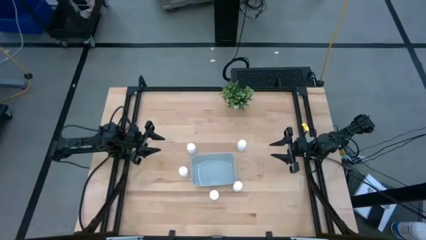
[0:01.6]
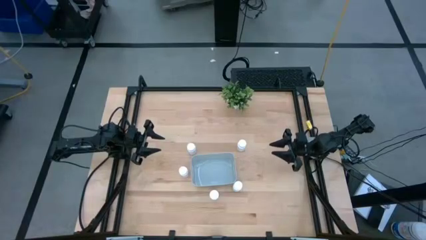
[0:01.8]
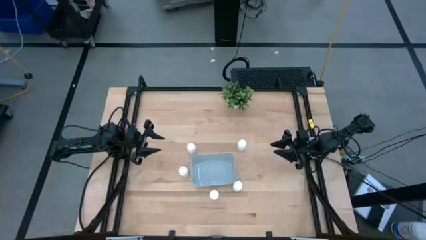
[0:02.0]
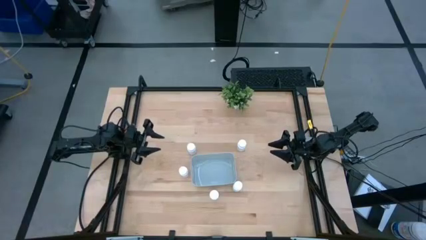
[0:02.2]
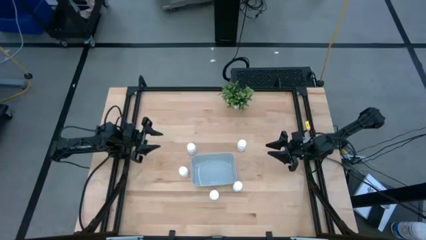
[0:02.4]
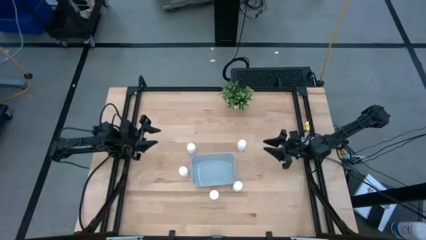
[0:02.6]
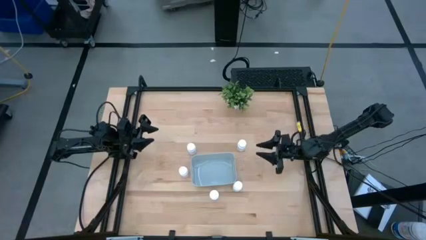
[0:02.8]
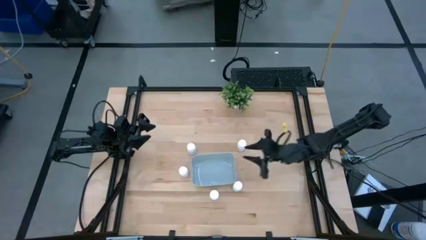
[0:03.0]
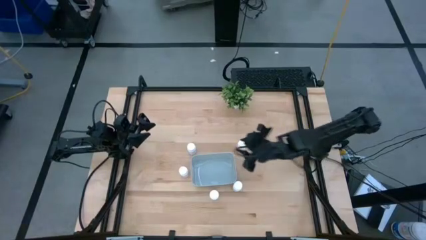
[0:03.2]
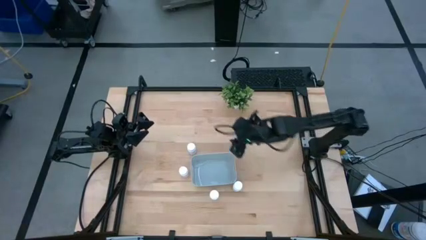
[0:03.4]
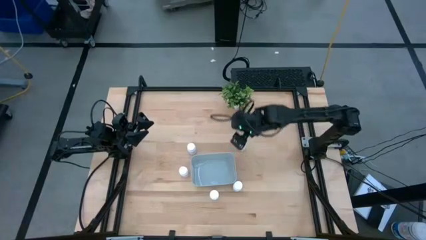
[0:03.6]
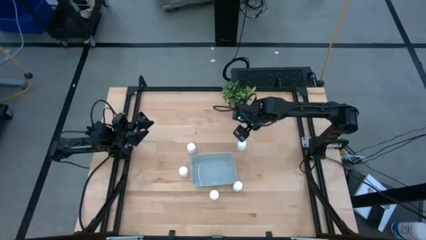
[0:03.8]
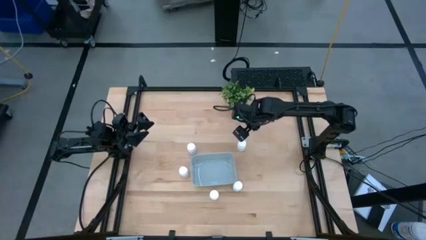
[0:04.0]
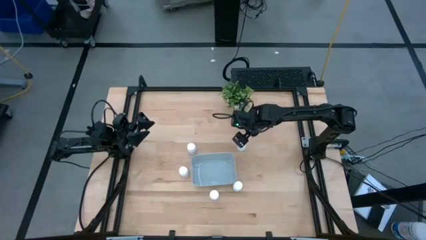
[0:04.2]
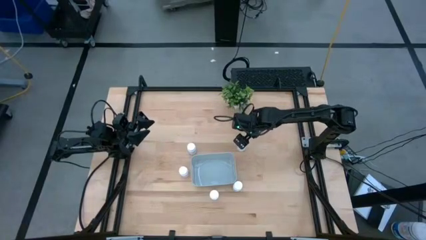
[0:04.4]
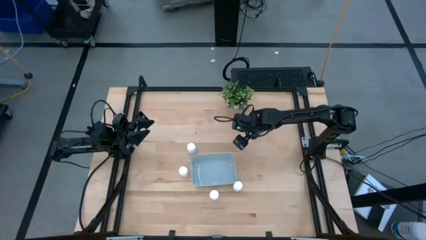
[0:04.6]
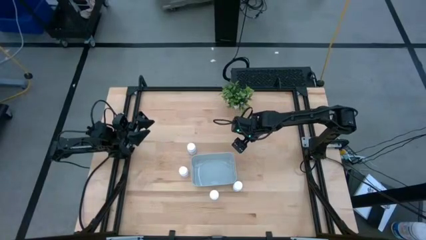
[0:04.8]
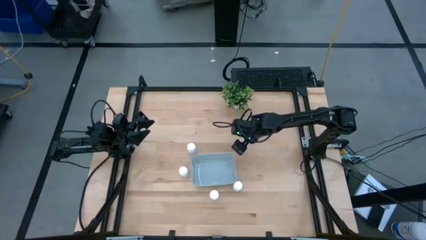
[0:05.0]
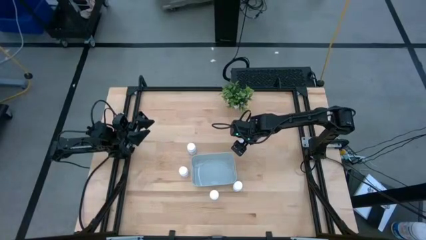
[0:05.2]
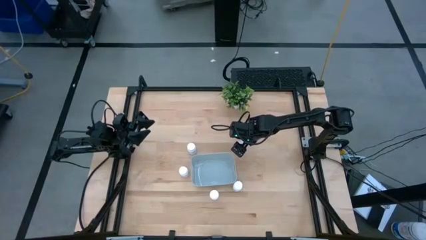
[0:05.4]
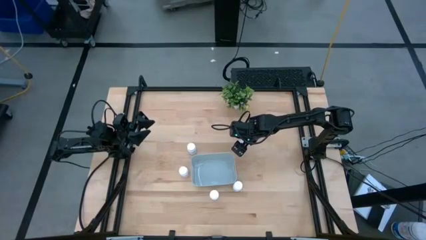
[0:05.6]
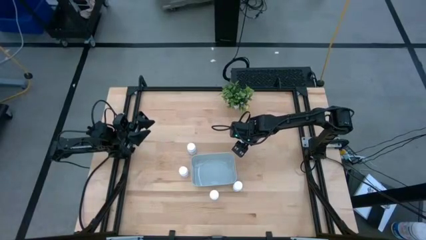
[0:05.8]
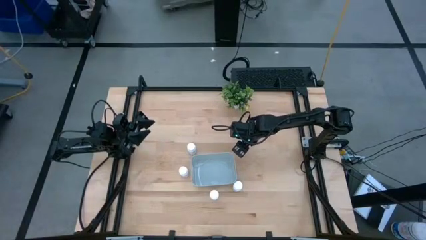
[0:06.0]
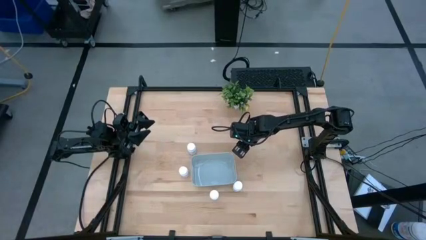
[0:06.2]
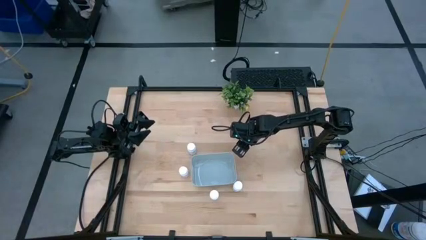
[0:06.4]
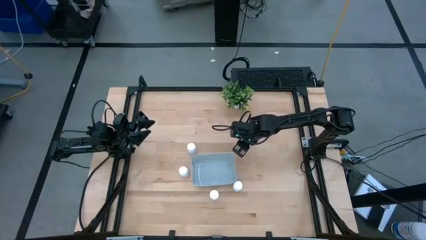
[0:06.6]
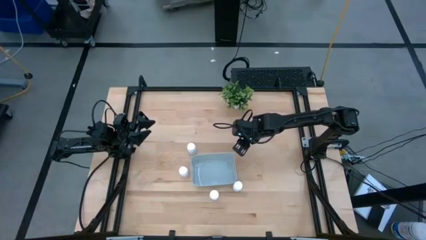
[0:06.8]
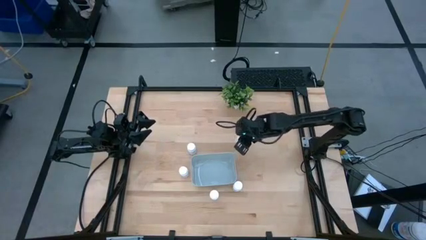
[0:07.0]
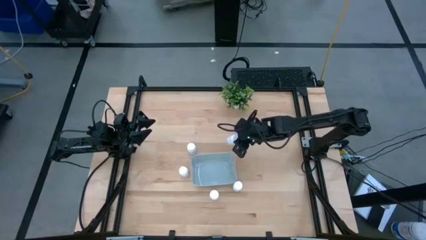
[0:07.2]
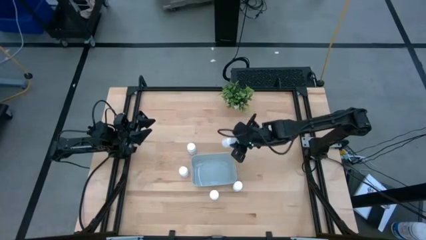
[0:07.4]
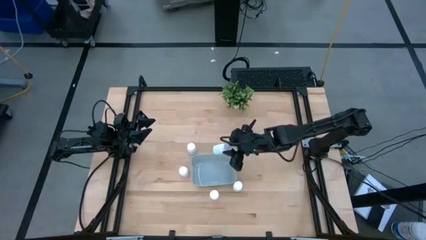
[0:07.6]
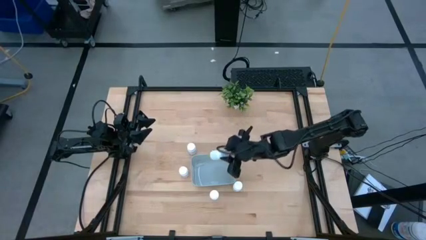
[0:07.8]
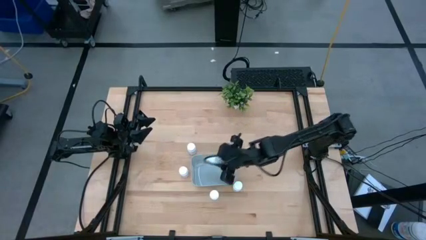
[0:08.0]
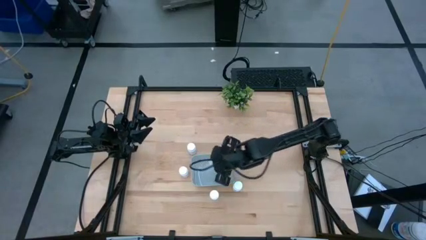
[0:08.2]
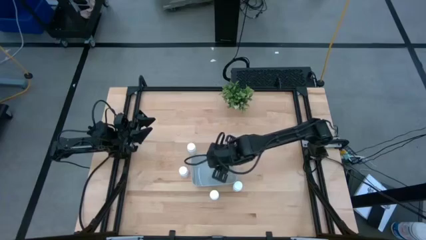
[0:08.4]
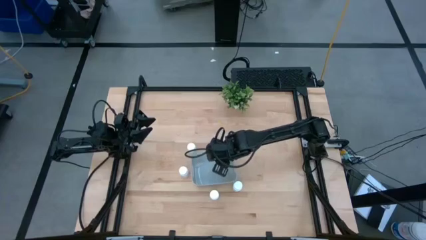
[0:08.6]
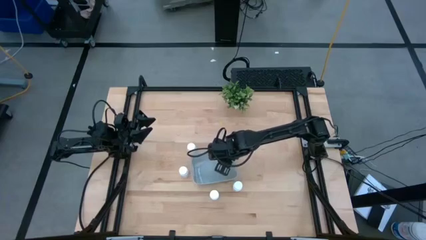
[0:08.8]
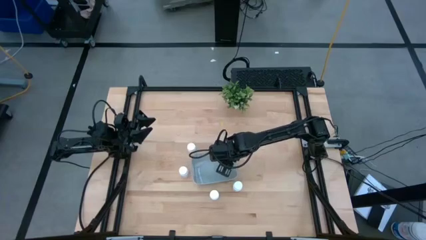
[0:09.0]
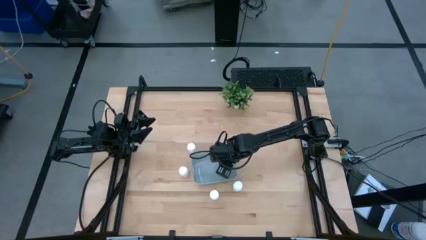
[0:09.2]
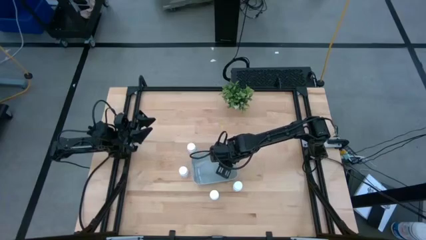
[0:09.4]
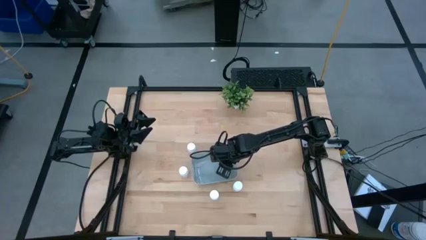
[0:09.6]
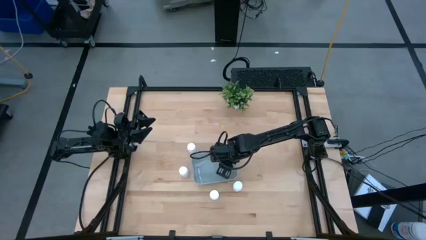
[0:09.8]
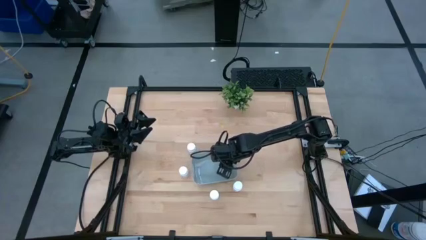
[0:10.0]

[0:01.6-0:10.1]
Task: Pick and place pill bottles into a basket
Put the white pill bottle into the white bin

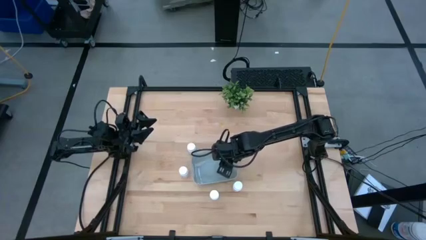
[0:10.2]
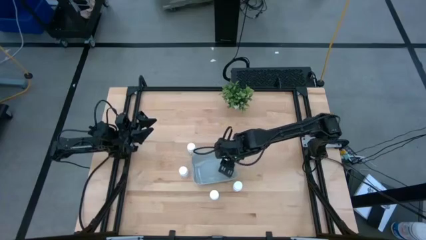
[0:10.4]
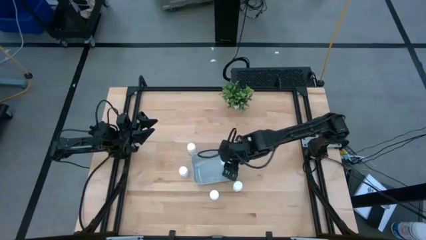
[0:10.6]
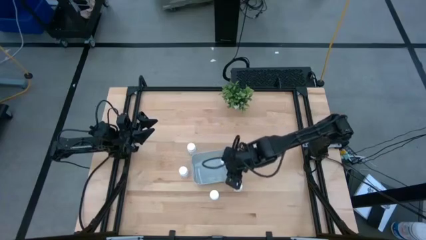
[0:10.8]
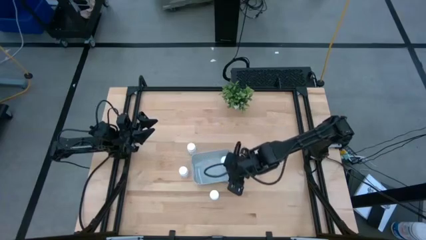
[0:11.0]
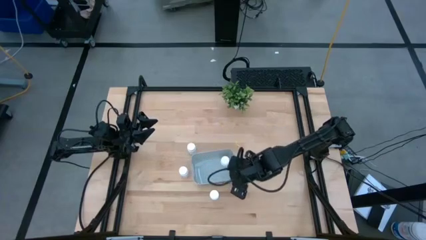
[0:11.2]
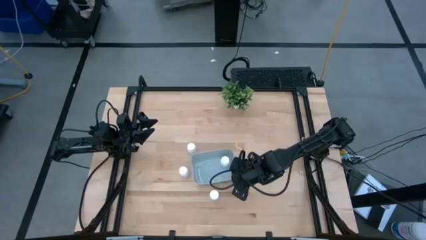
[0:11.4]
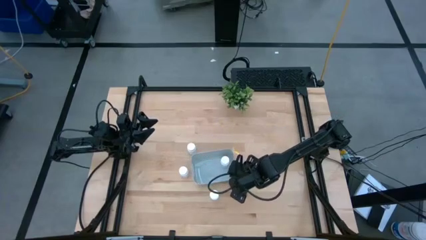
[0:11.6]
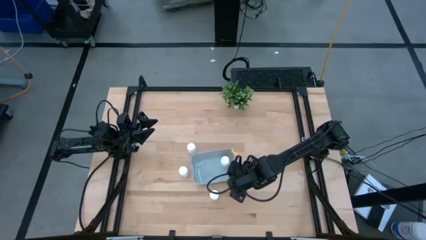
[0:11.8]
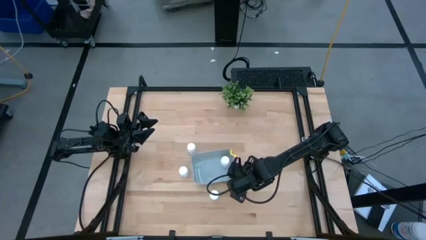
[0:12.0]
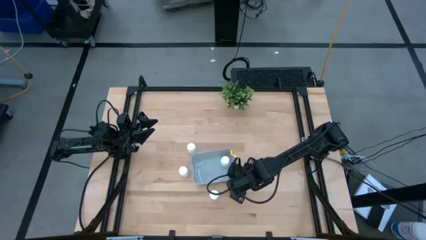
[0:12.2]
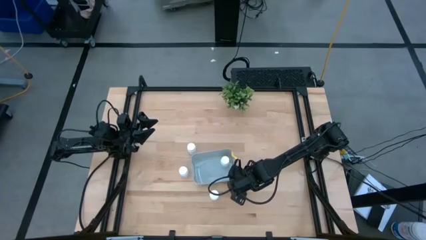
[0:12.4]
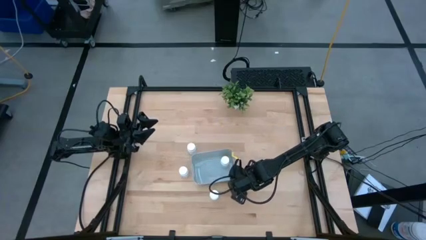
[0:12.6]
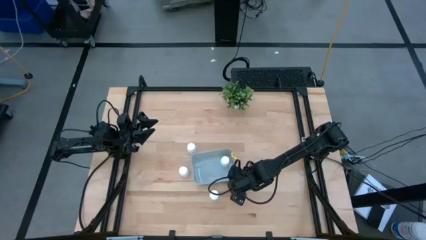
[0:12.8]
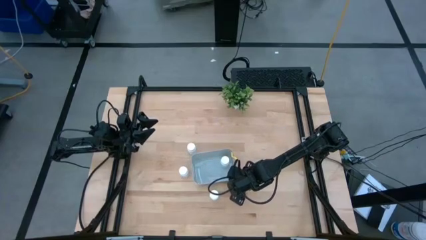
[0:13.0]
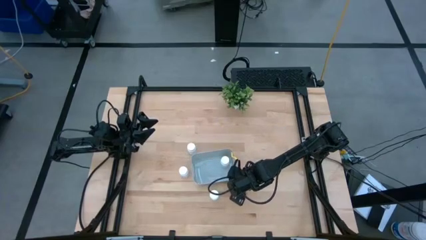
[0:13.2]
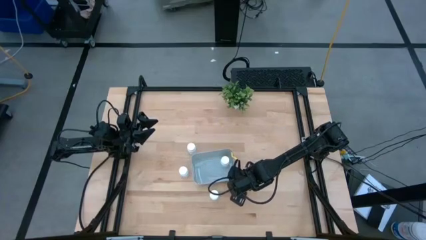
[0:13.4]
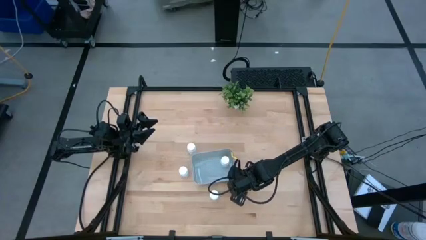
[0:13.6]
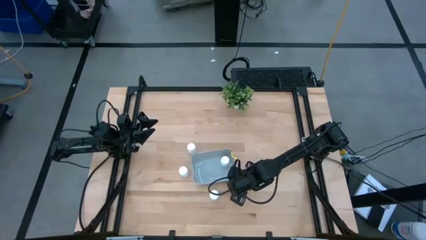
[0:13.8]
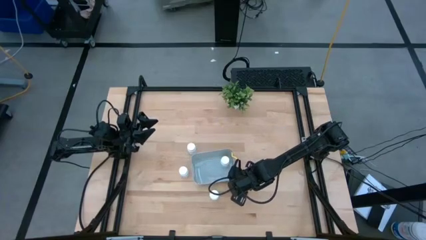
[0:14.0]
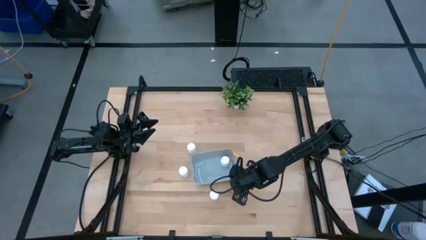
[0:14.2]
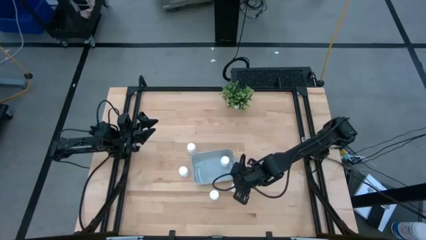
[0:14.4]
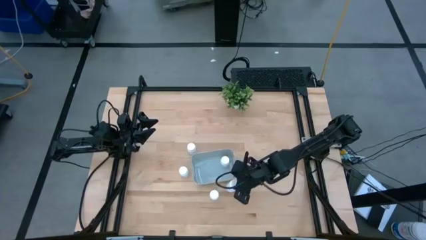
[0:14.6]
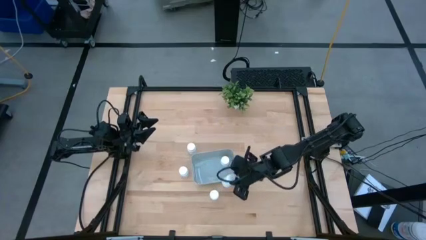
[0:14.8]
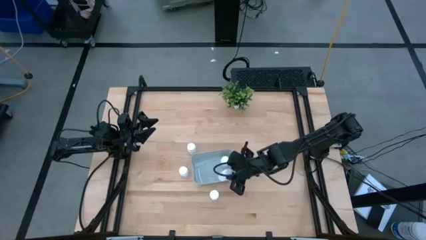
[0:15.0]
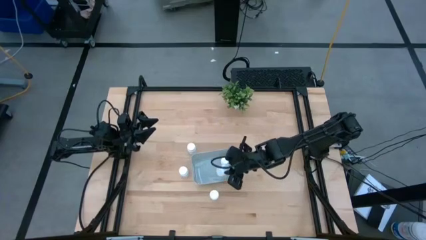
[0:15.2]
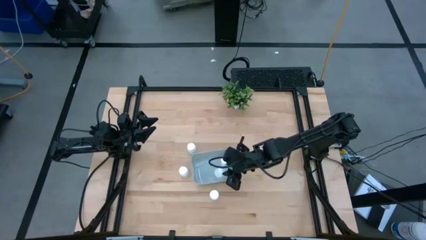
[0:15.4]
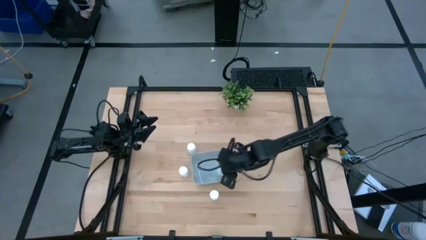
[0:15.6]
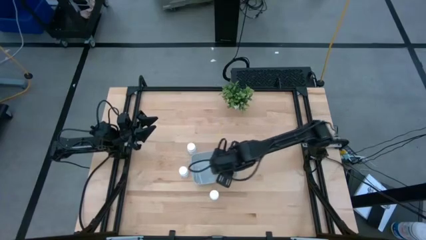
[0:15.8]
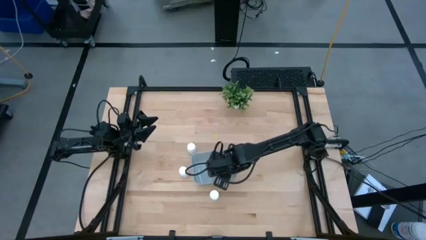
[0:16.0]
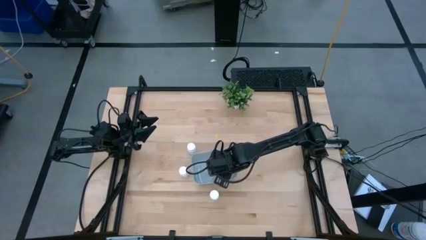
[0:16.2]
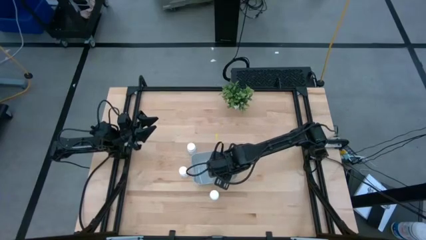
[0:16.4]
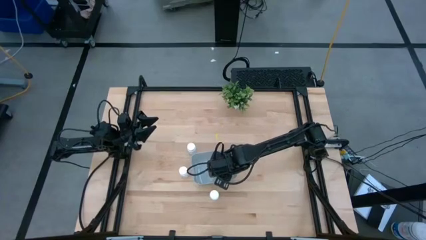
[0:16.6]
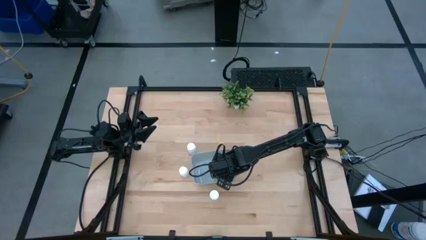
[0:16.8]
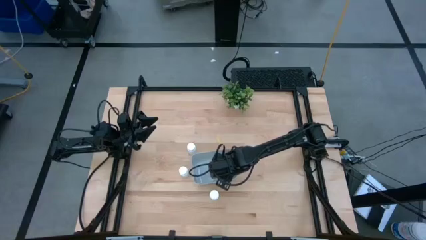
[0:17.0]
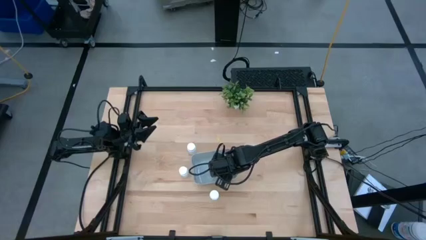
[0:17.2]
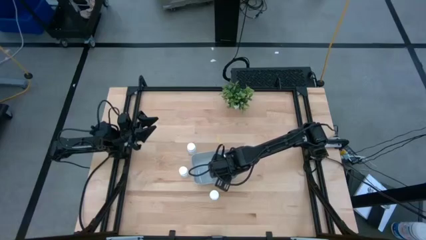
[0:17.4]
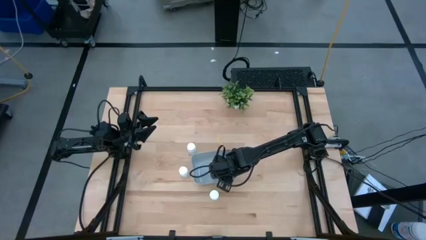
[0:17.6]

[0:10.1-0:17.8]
Put the white pill bottle into the white bin
